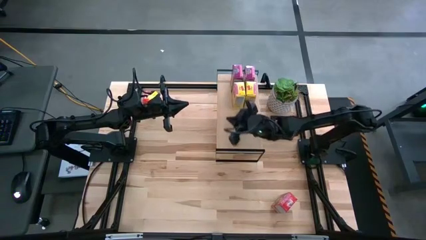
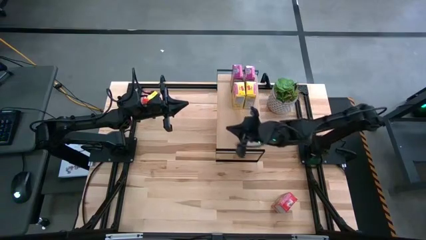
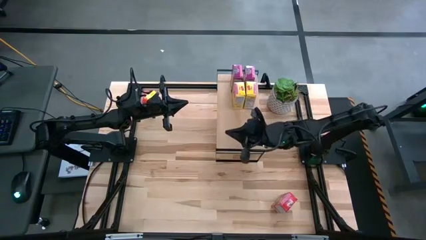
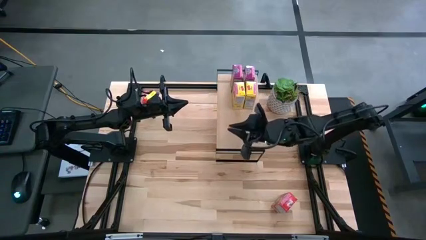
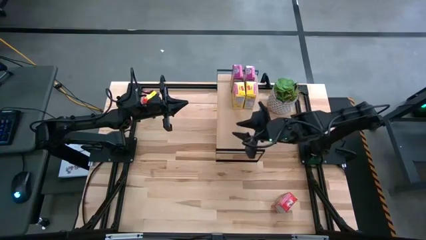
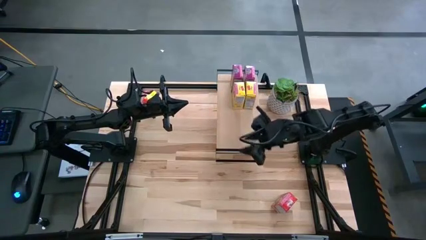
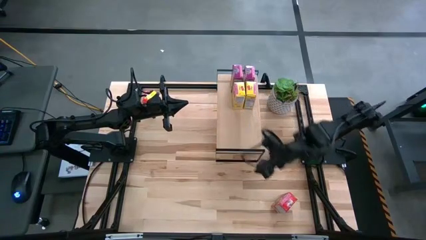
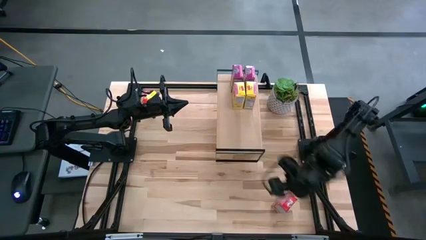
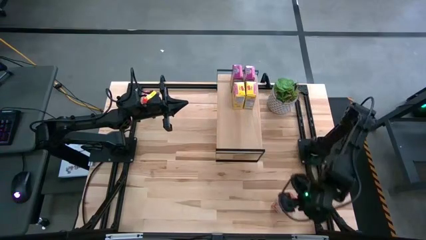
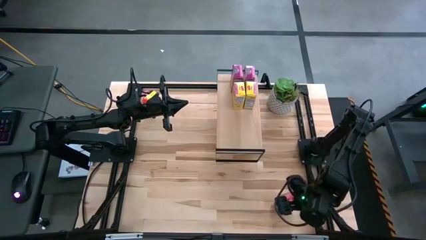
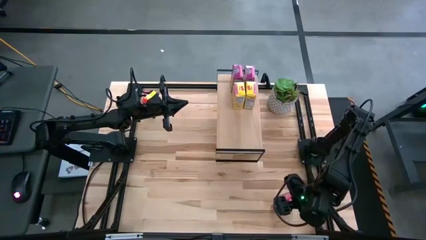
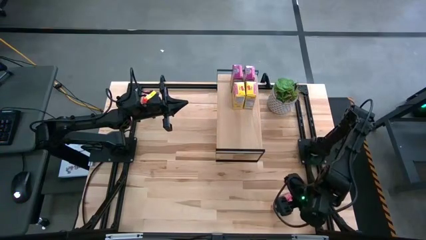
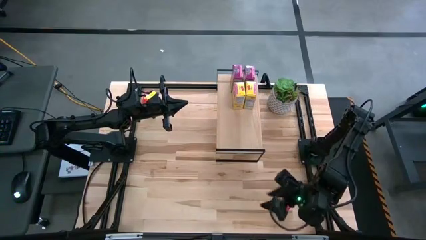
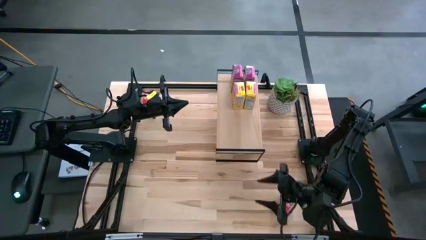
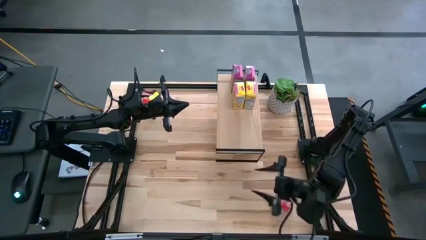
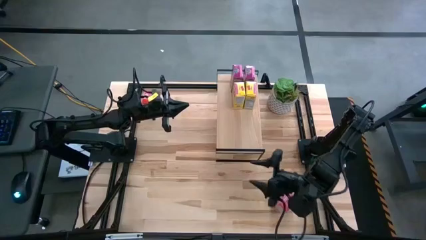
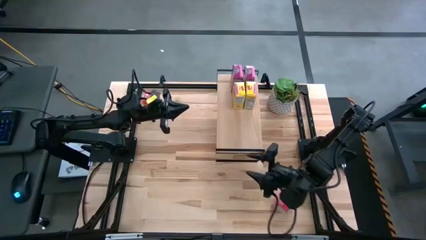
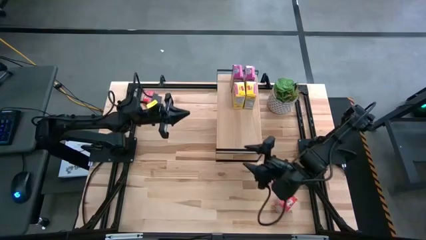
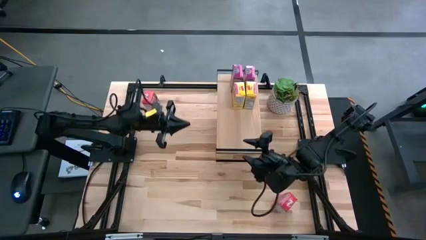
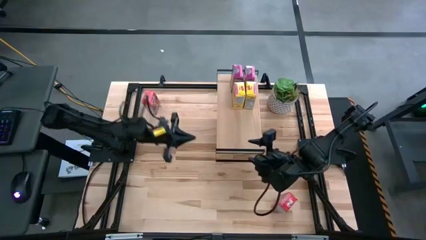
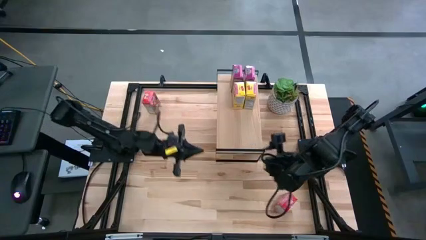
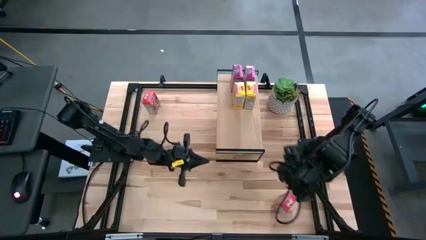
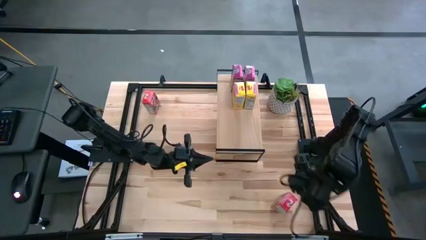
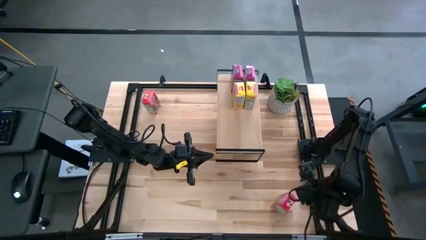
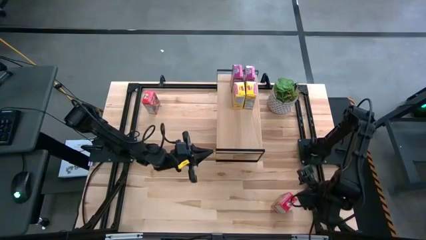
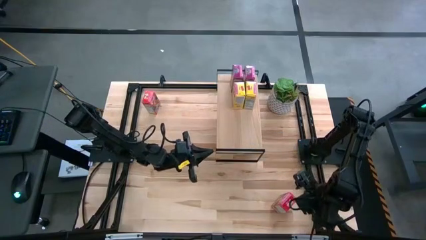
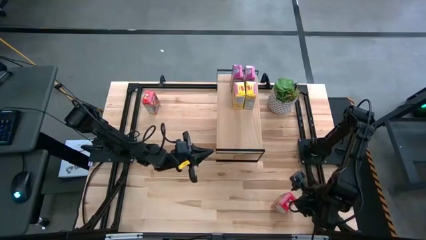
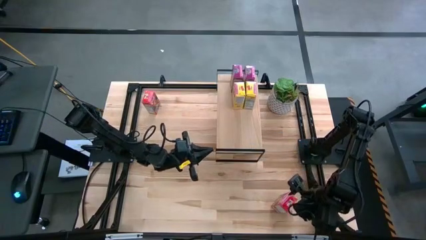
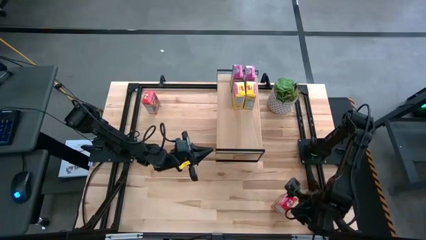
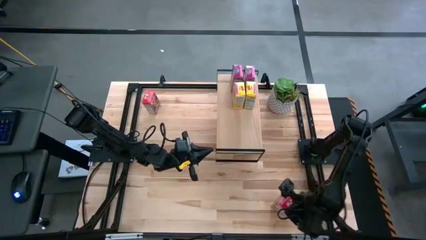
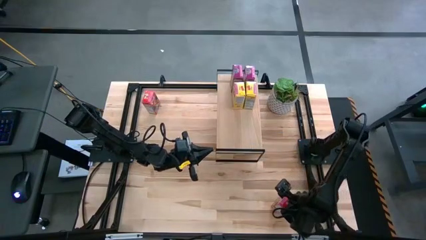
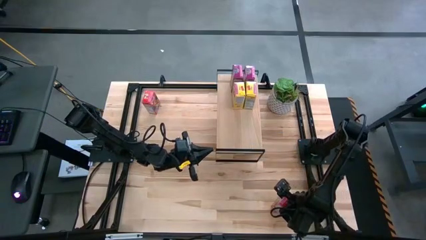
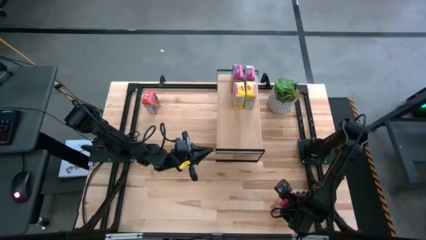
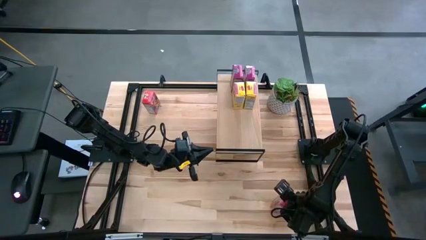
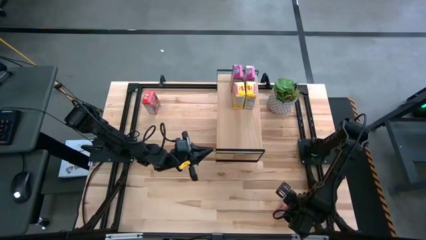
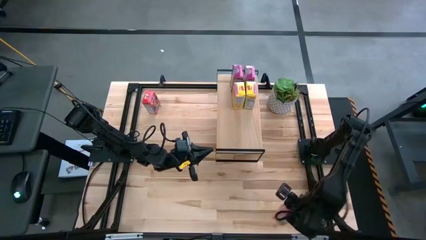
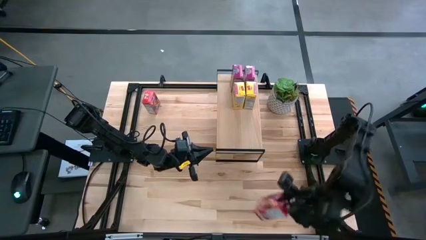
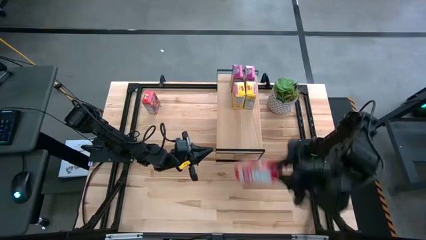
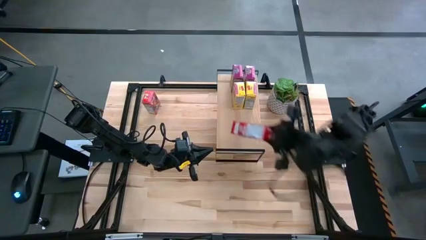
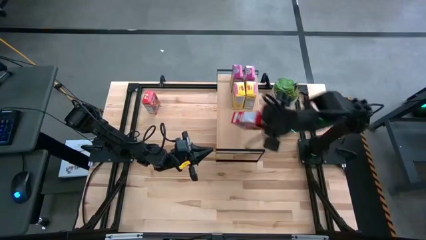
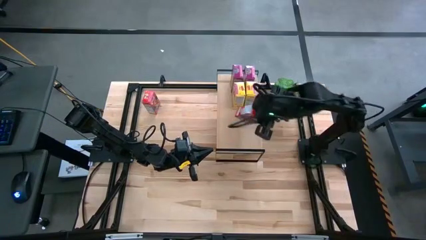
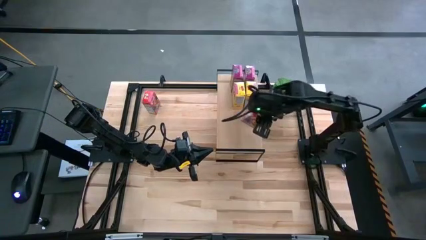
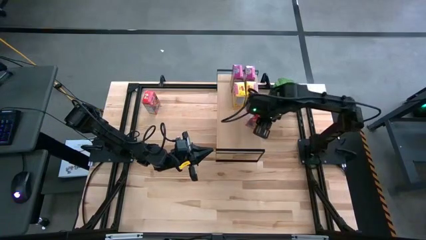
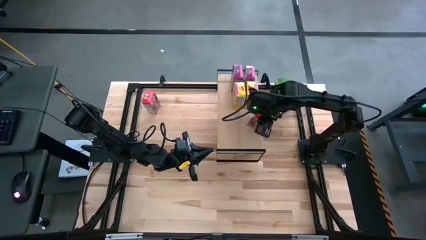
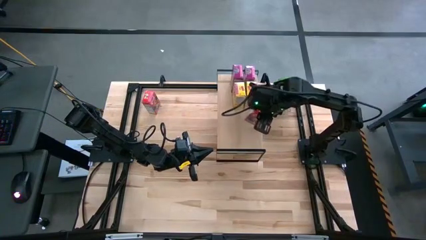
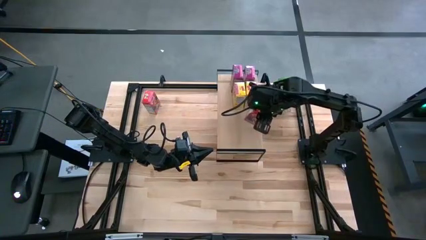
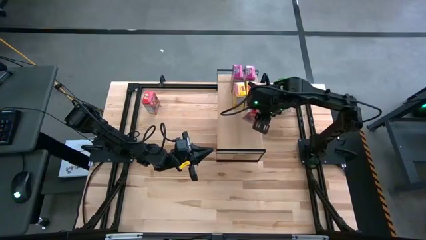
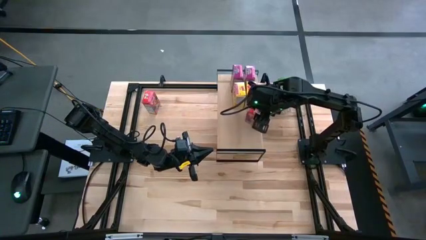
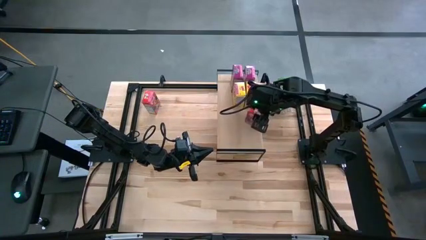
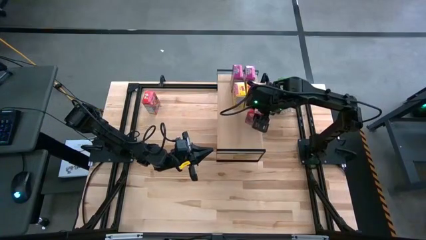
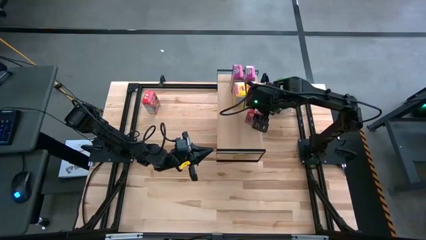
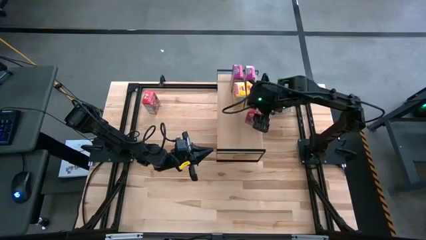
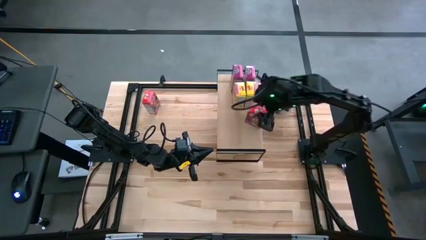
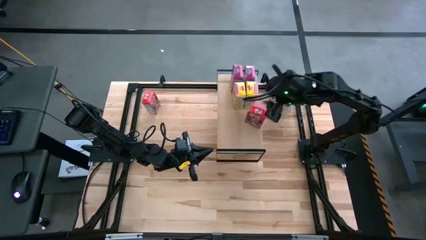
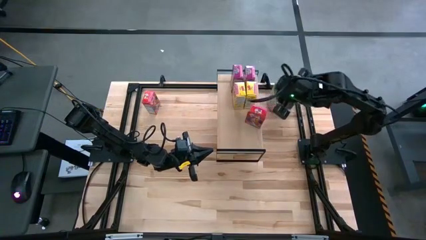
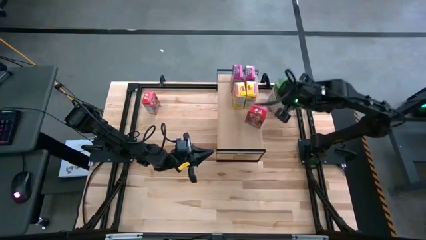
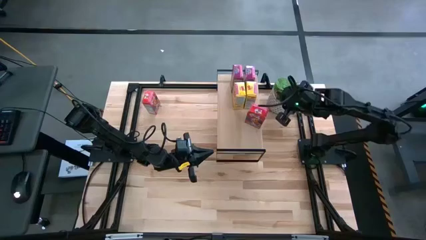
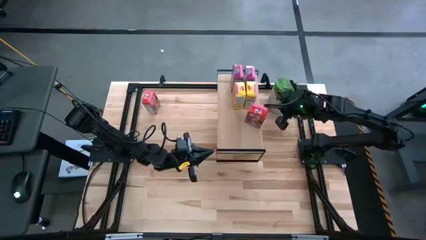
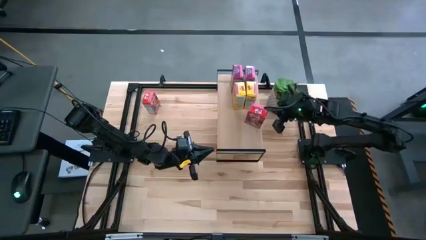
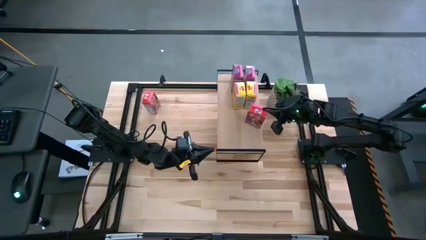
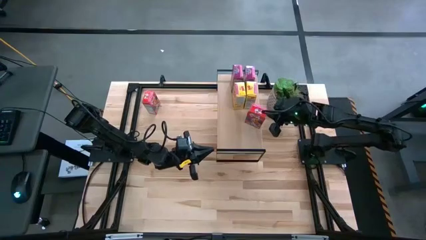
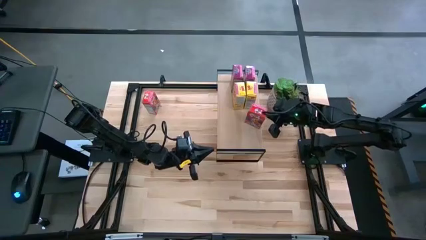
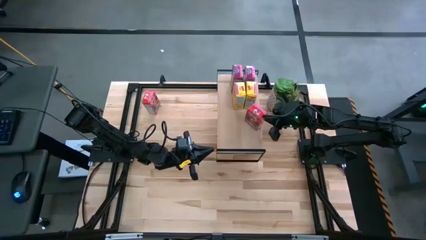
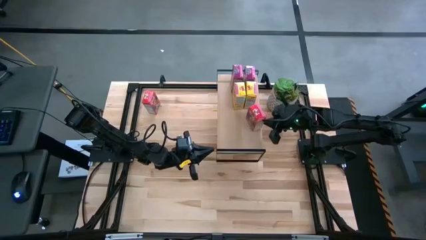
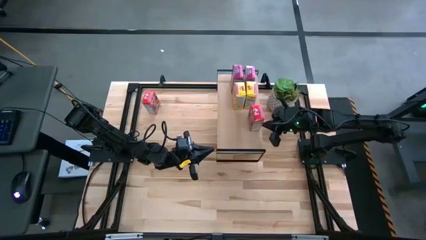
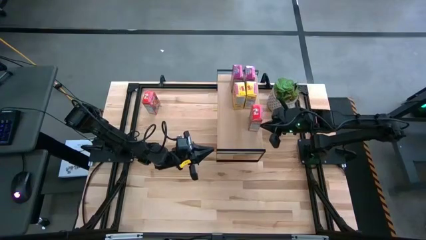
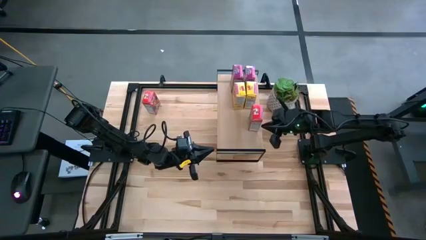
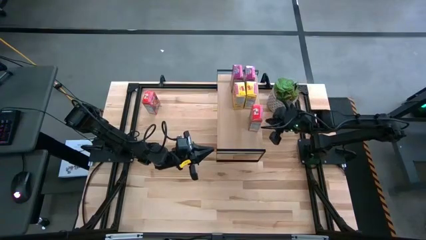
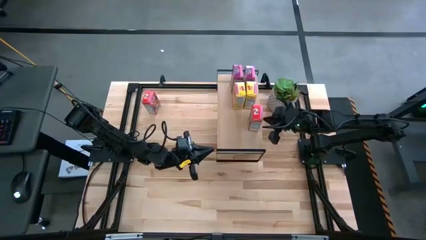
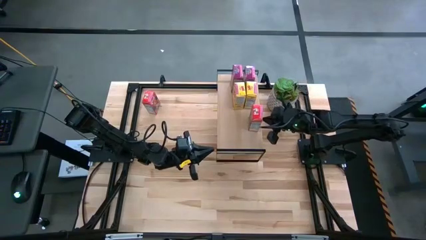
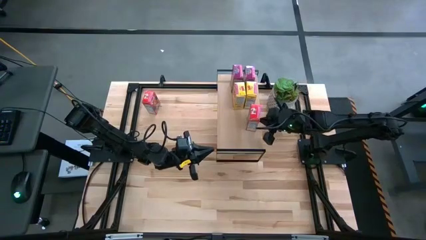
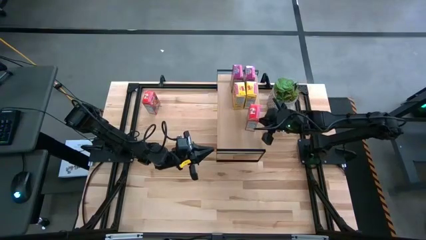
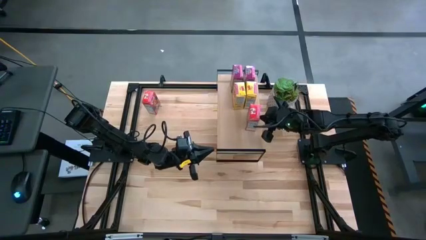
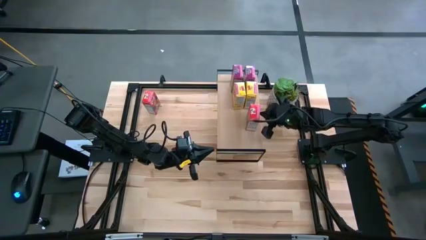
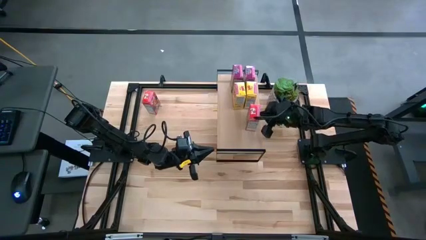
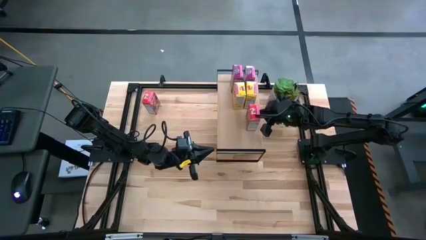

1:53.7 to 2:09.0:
Task: Stack cereal on shelf
Put the bottom red cereal box on the shelf
